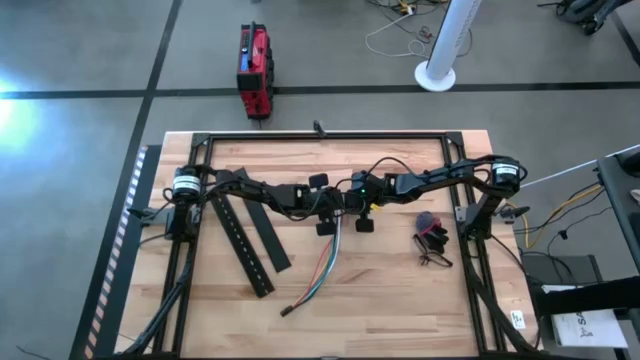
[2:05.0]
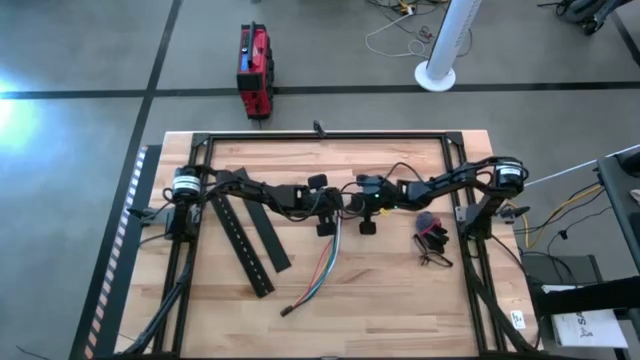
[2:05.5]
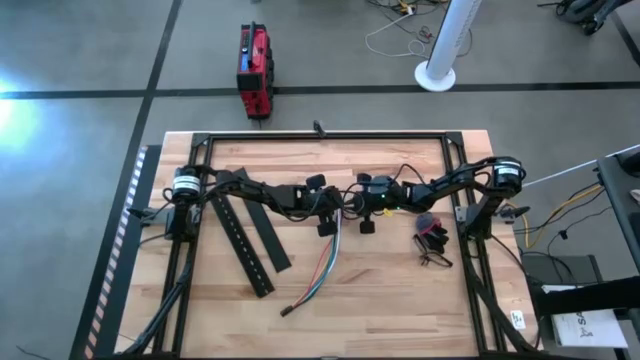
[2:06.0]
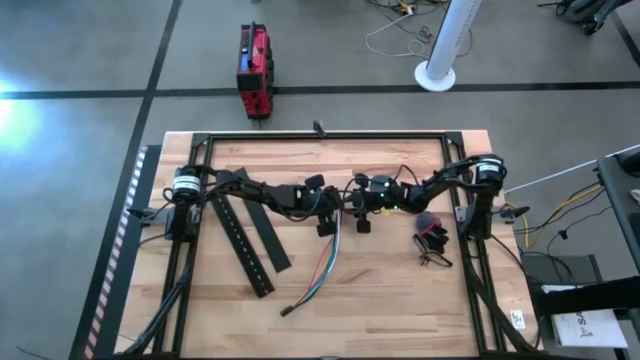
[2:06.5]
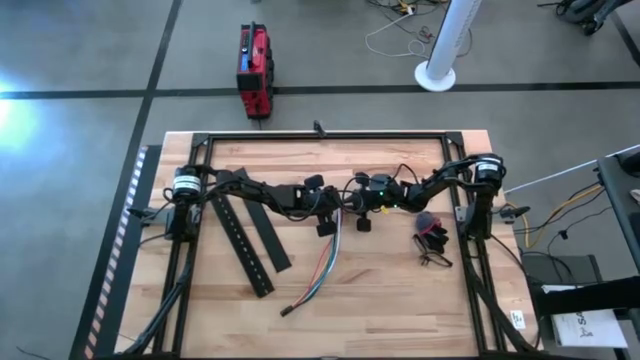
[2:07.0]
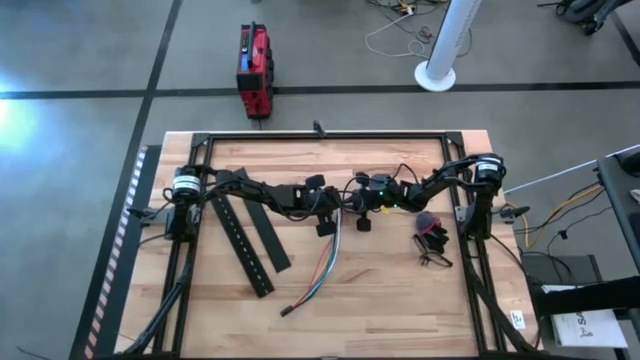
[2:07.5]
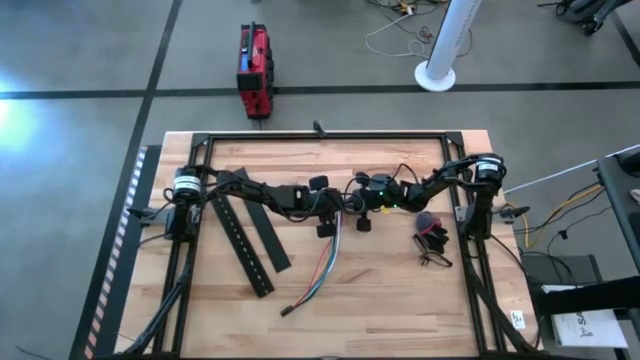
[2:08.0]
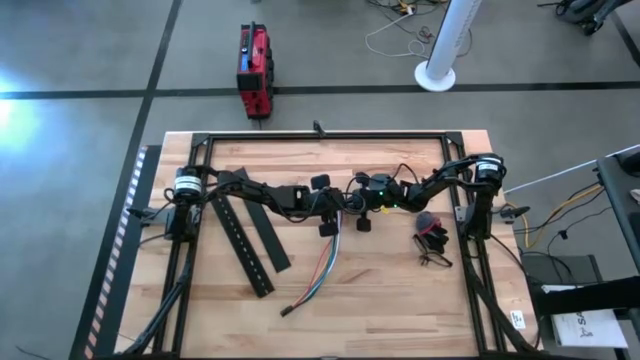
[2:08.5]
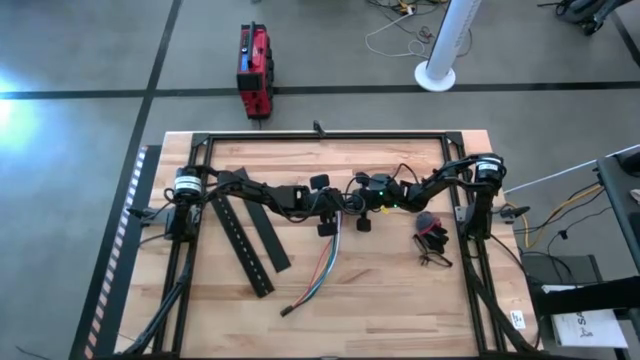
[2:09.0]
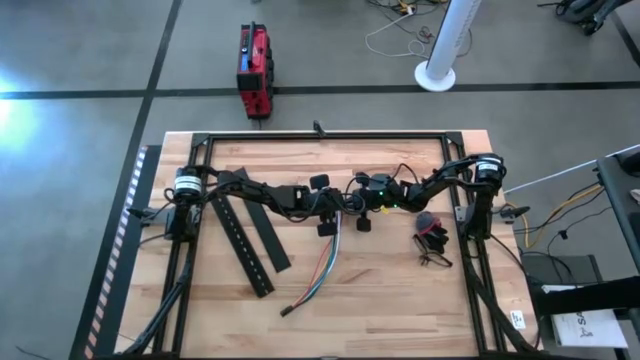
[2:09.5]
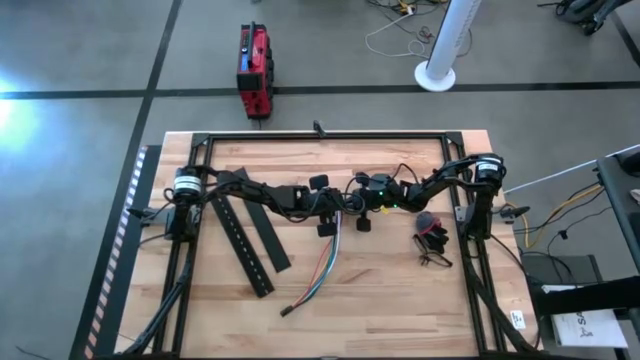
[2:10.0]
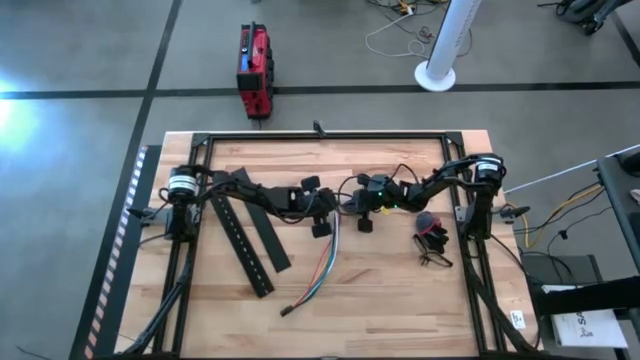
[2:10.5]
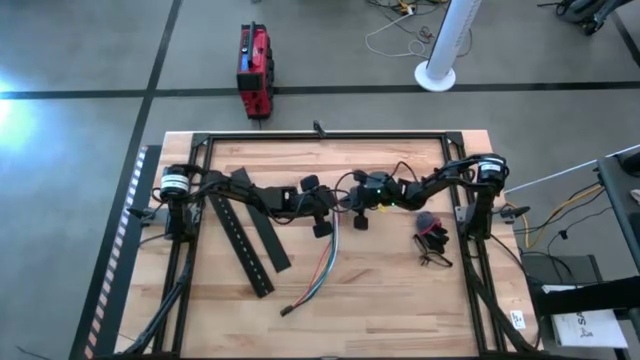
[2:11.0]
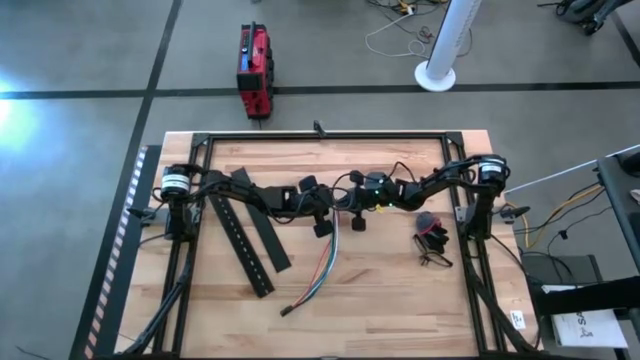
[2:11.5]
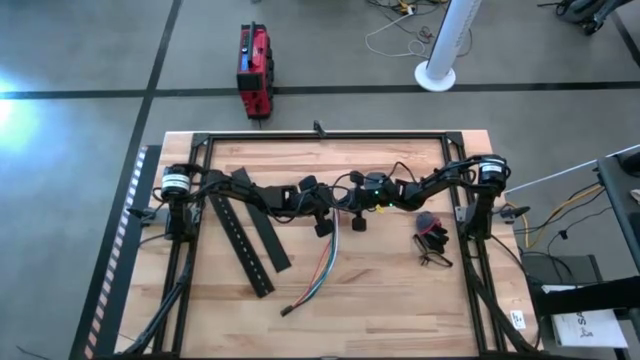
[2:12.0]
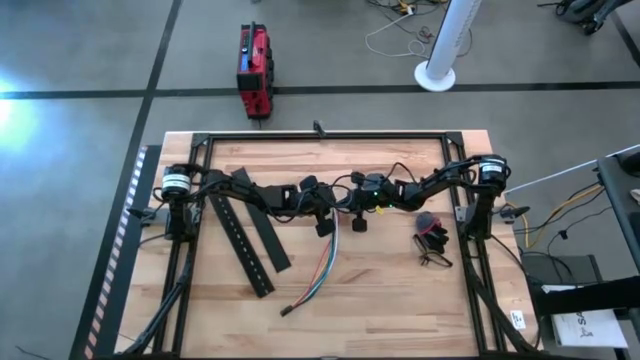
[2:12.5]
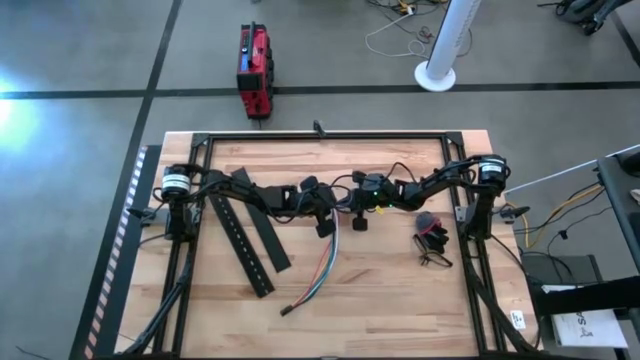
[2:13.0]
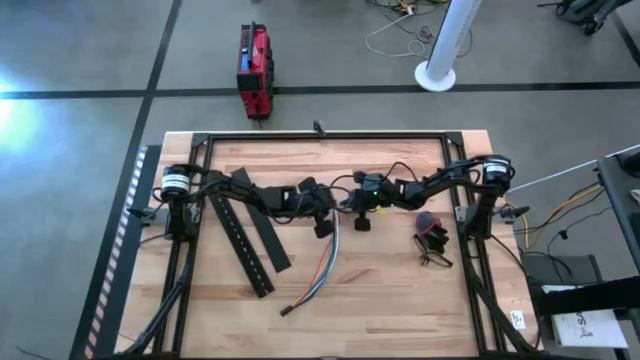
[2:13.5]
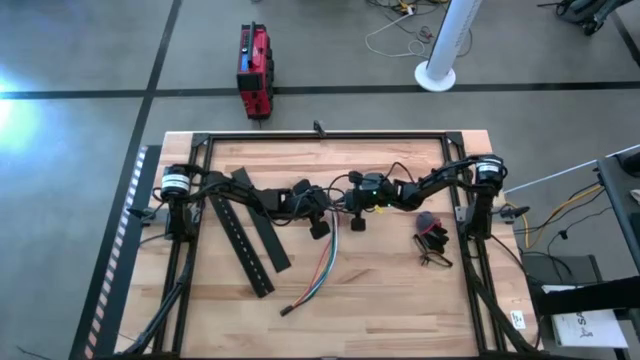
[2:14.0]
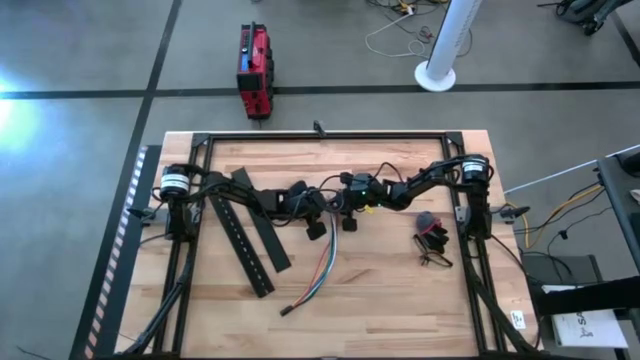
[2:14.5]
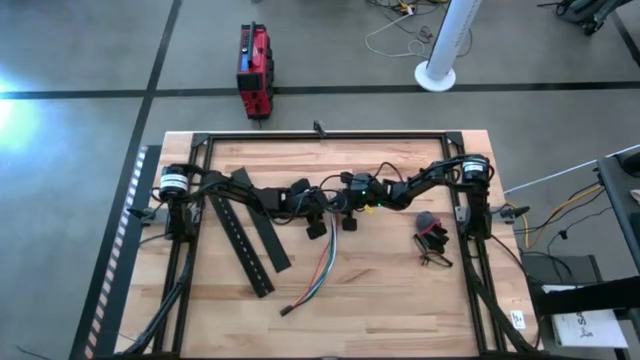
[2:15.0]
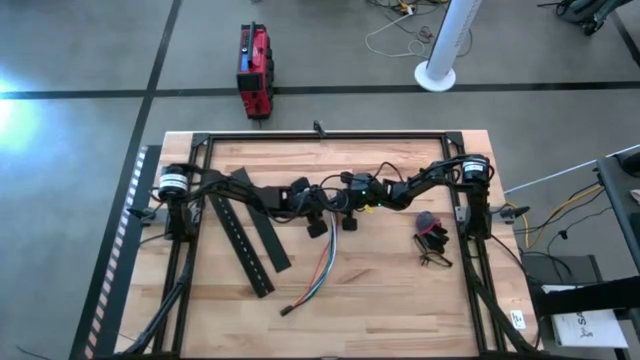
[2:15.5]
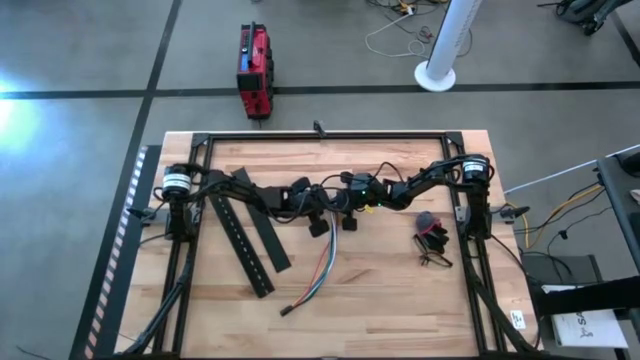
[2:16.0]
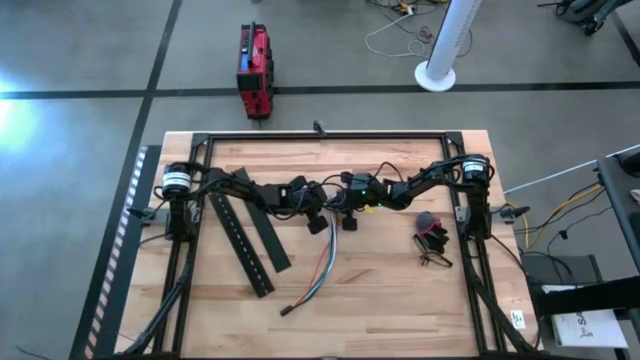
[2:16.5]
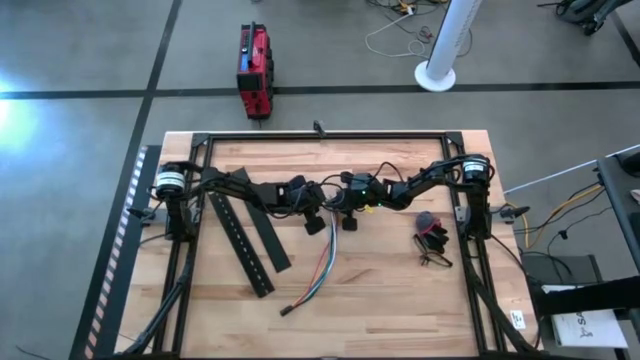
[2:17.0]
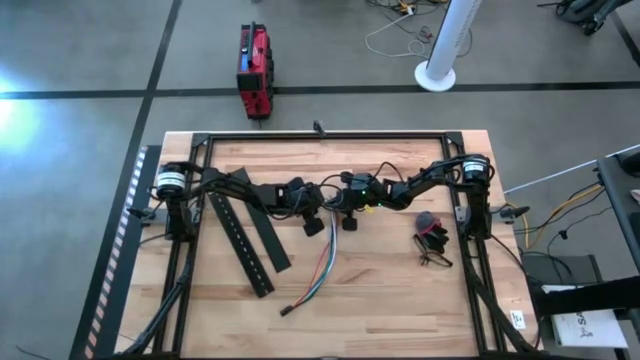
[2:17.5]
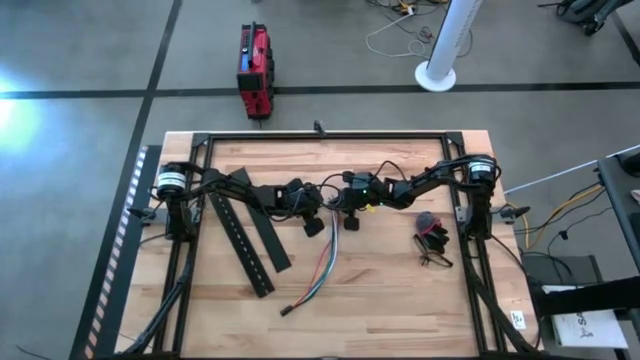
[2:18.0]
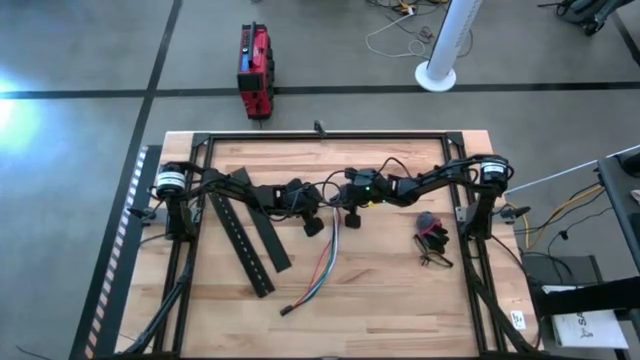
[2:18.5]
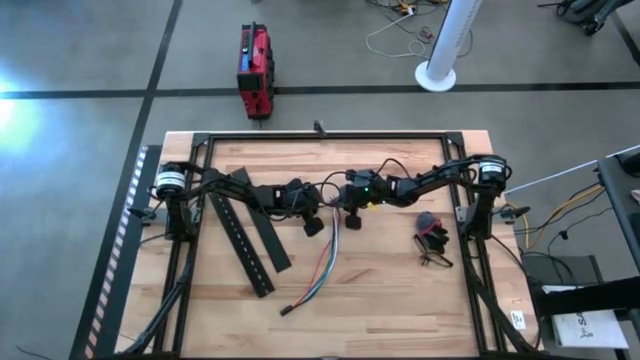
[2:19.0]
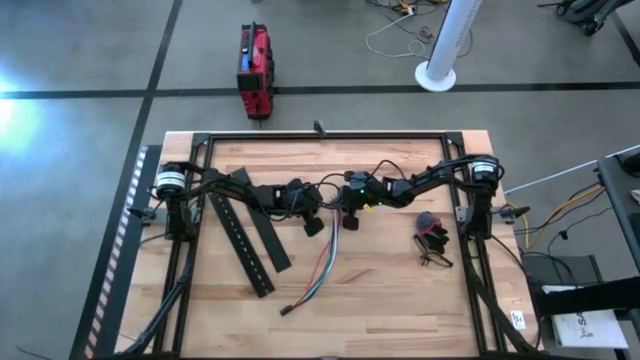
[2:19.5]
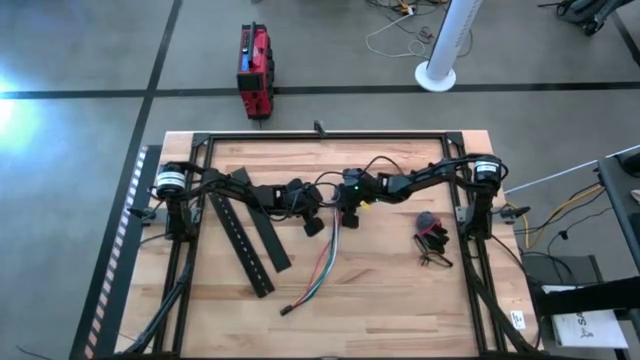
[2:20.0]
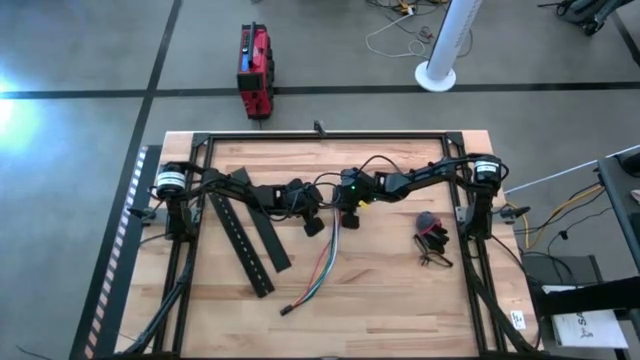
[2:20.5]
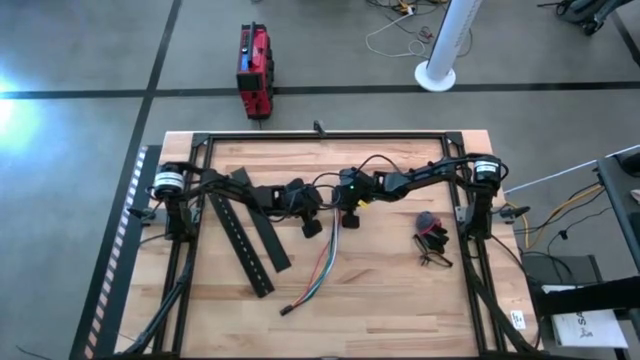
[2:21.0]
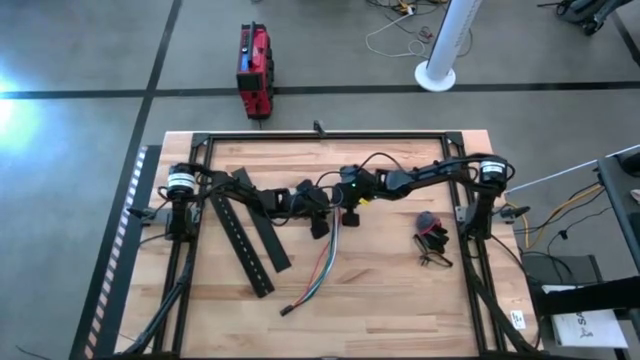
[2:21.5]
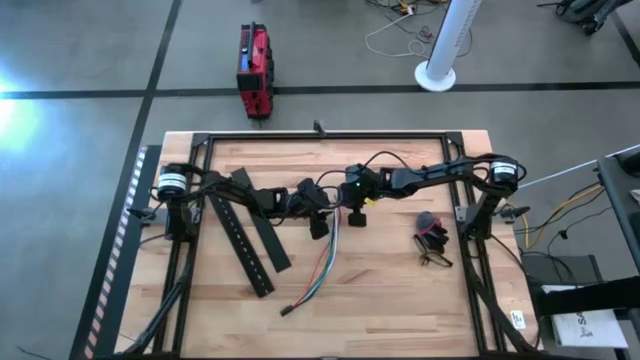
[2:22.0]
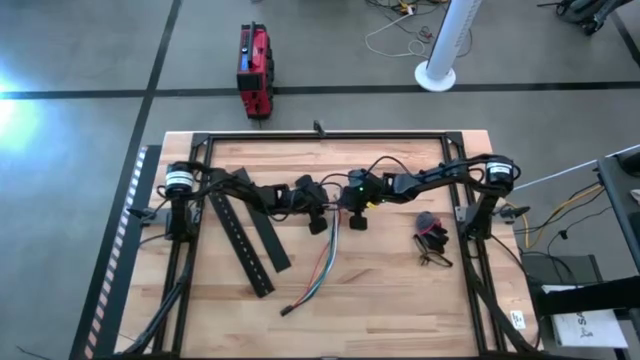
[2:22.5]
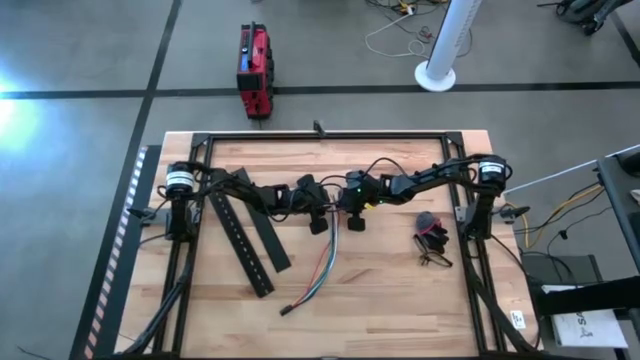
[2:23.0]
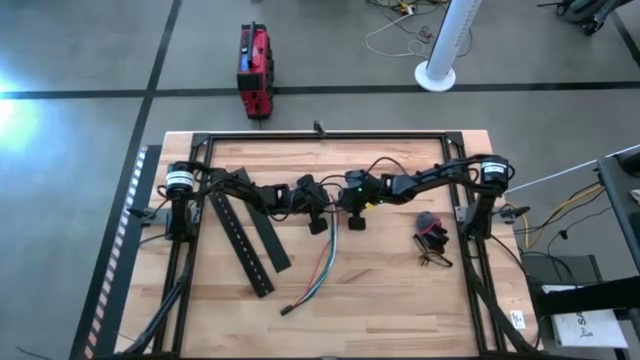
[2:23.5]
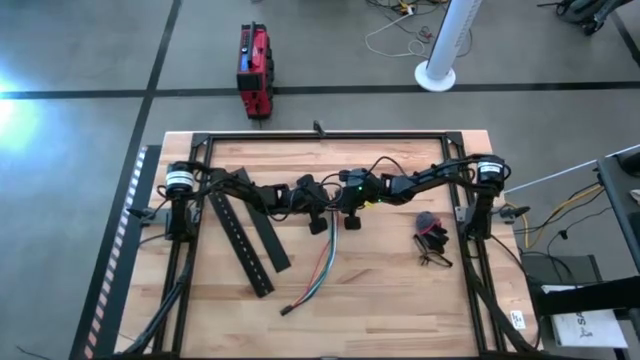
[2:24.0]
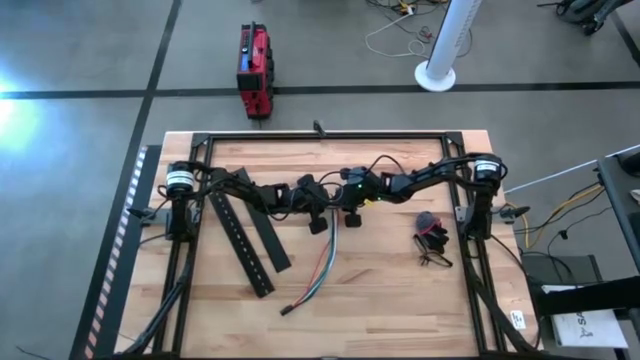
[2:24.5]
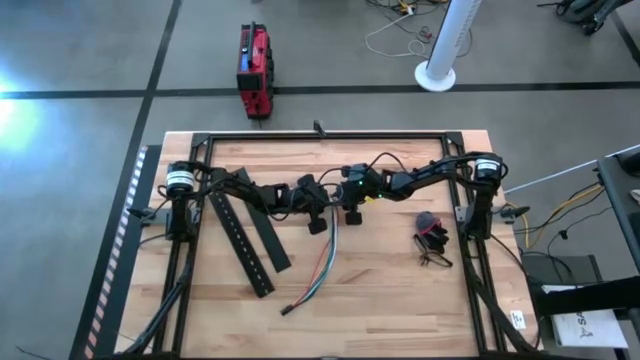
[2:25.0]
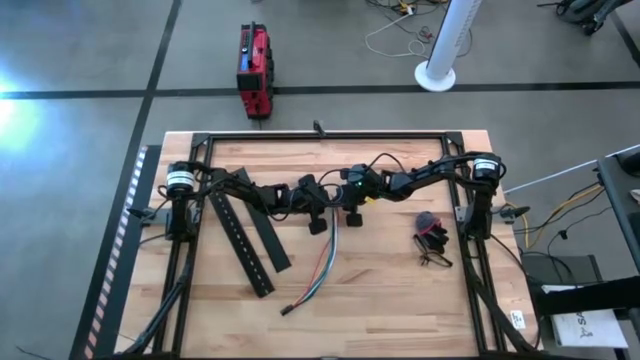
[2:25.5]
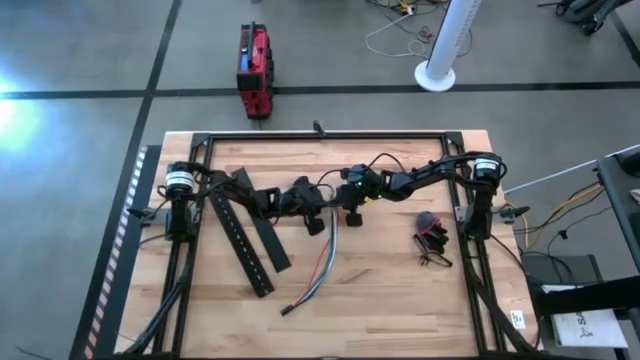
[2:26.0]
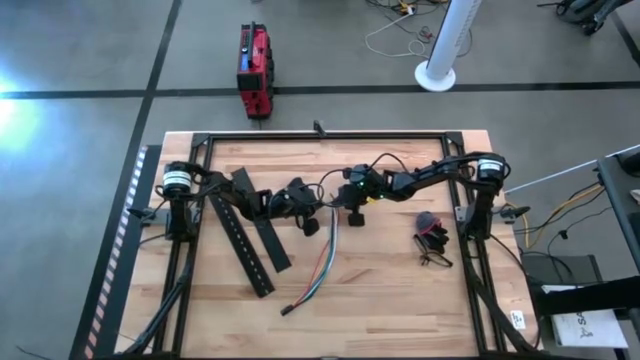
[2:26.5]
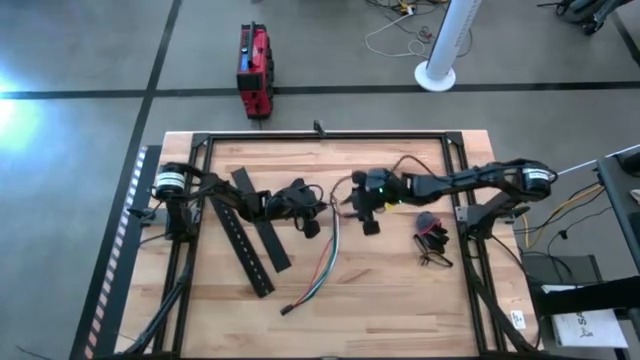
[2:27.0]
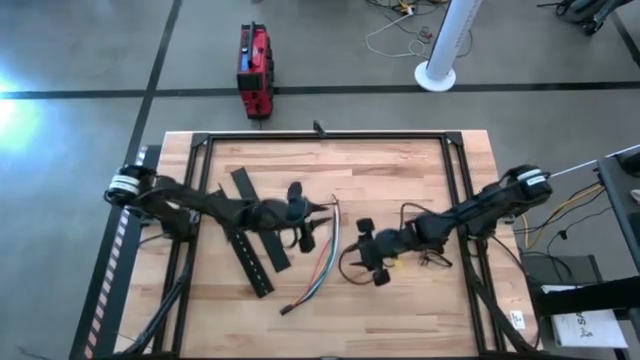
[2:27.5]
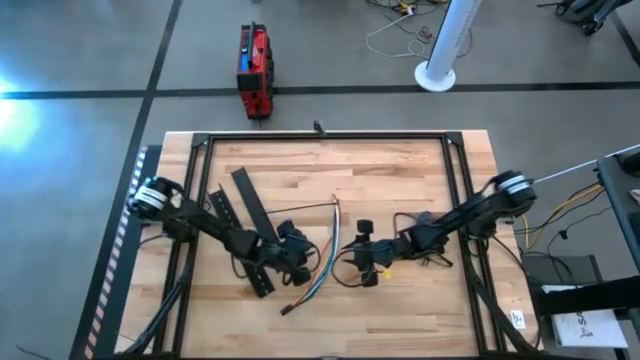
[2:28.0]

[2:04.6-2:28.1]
Task: Ziptie cables
Wrap the cable wires with the black zip tie
